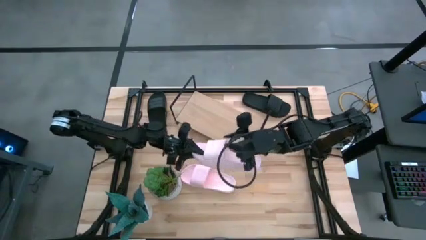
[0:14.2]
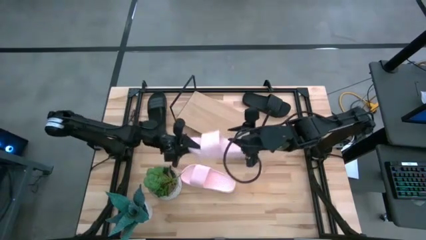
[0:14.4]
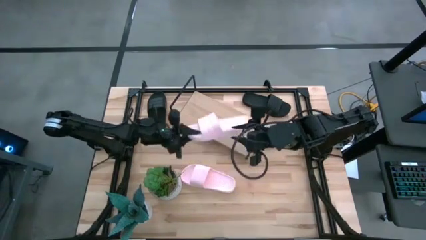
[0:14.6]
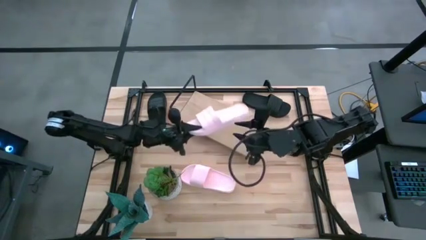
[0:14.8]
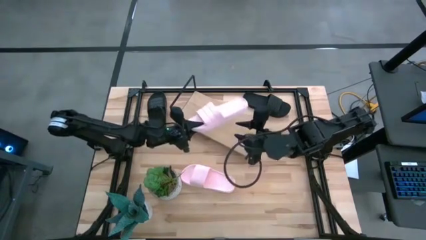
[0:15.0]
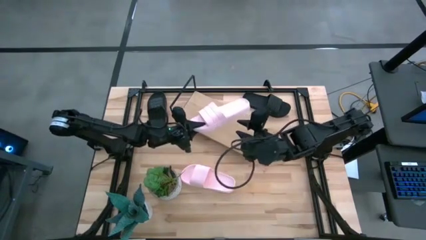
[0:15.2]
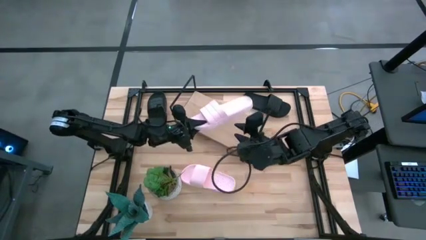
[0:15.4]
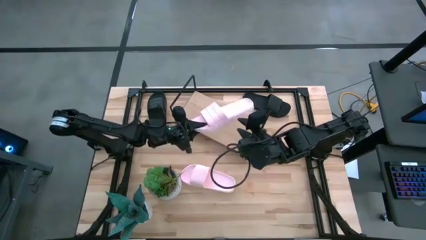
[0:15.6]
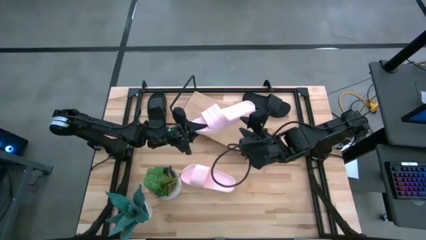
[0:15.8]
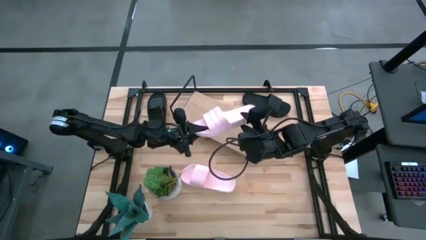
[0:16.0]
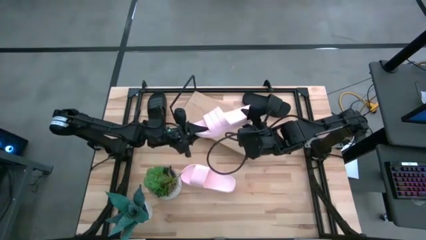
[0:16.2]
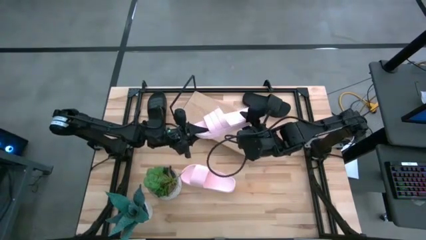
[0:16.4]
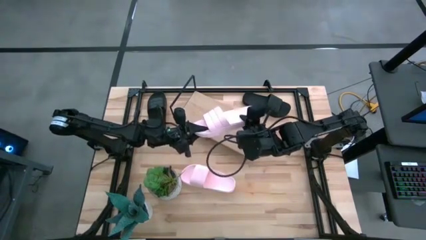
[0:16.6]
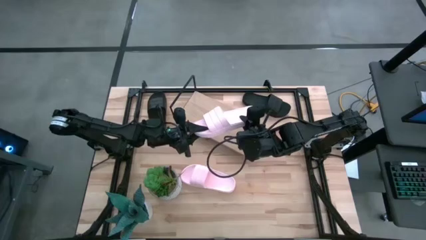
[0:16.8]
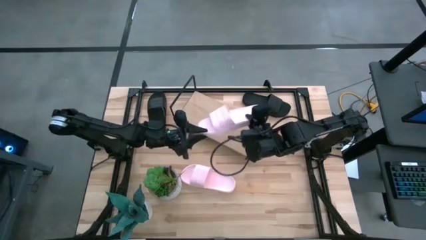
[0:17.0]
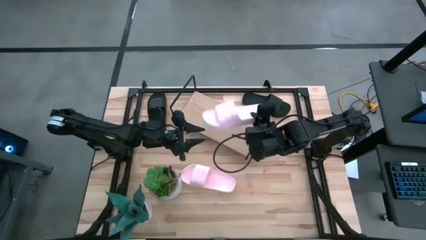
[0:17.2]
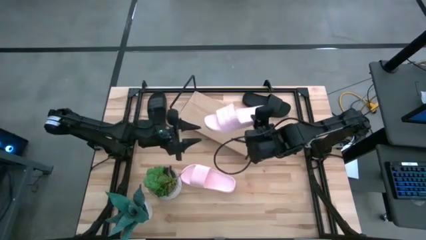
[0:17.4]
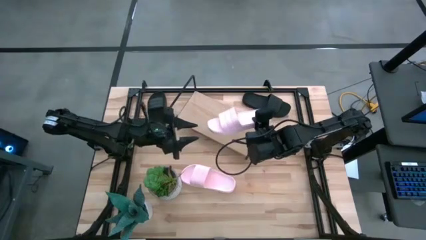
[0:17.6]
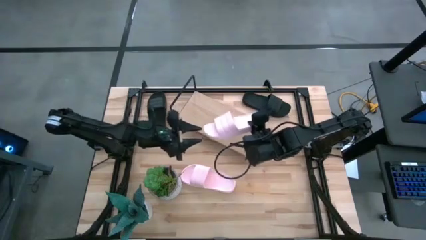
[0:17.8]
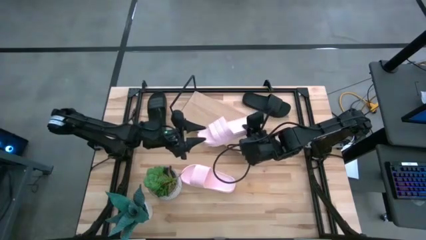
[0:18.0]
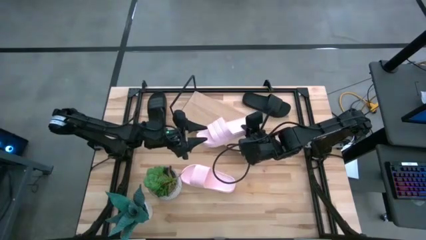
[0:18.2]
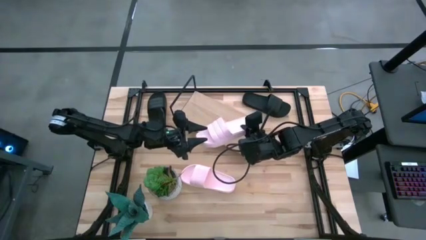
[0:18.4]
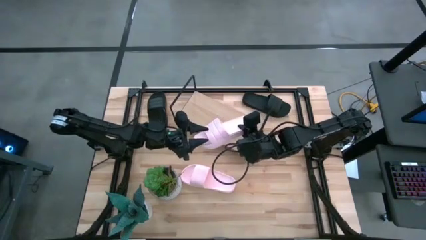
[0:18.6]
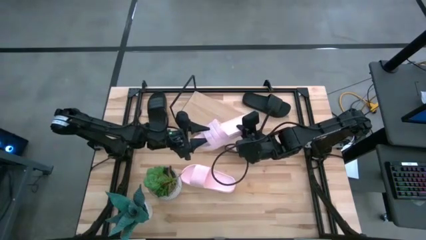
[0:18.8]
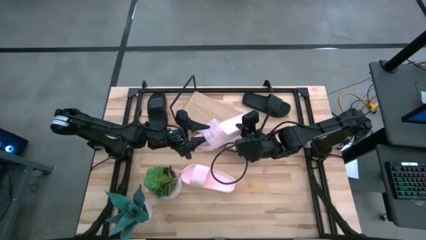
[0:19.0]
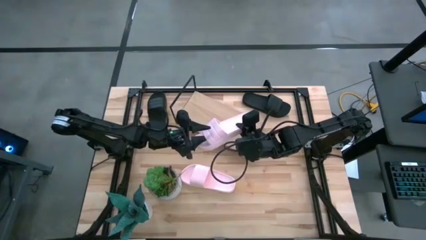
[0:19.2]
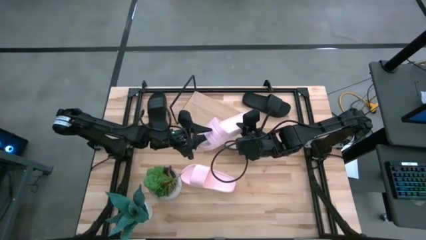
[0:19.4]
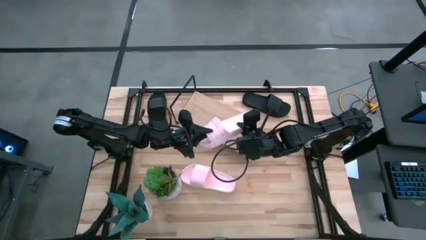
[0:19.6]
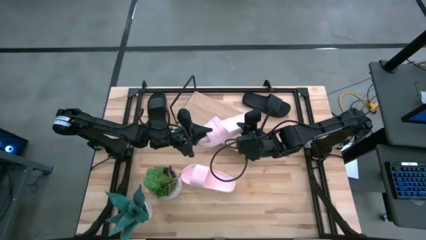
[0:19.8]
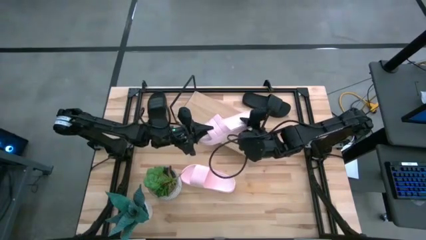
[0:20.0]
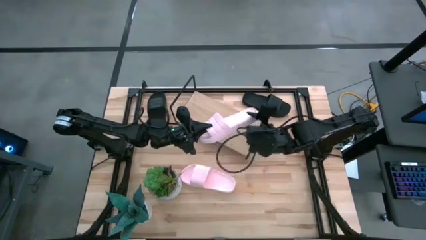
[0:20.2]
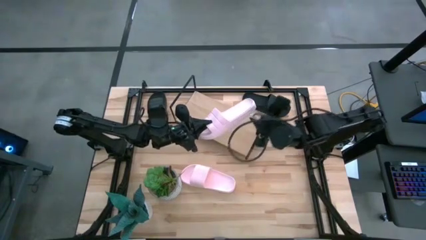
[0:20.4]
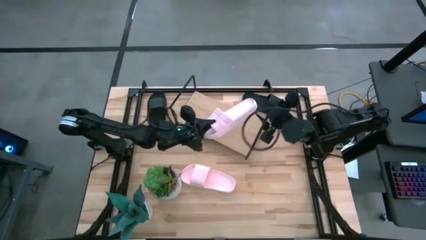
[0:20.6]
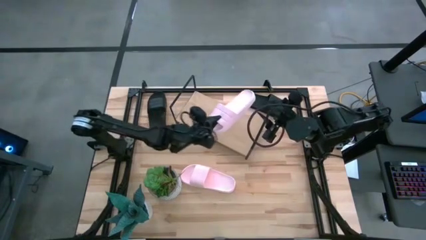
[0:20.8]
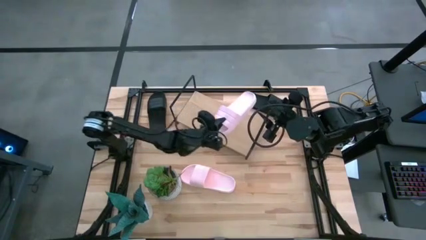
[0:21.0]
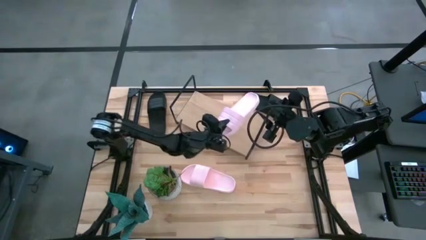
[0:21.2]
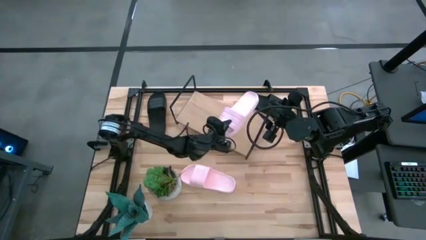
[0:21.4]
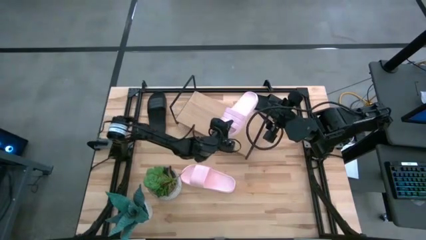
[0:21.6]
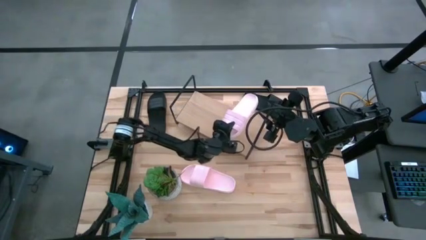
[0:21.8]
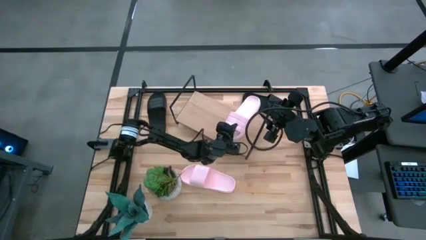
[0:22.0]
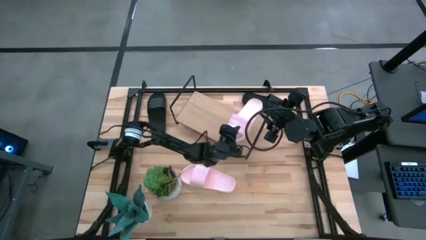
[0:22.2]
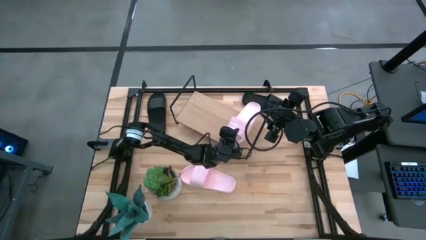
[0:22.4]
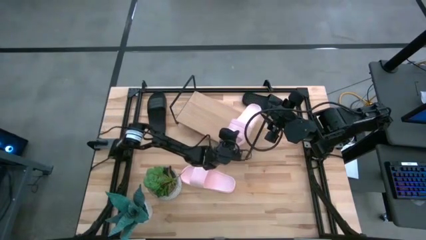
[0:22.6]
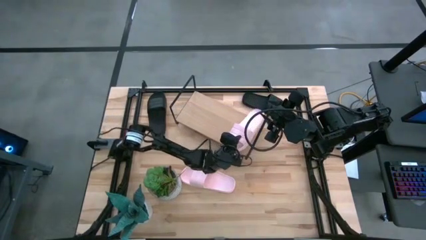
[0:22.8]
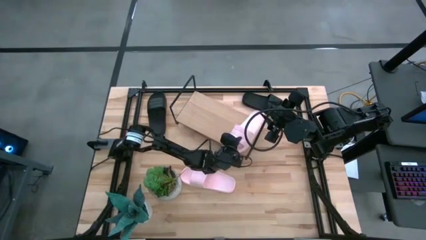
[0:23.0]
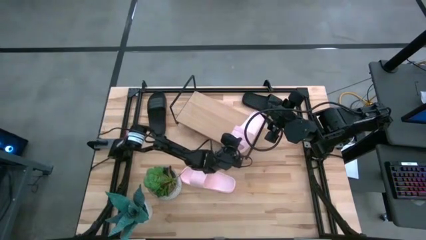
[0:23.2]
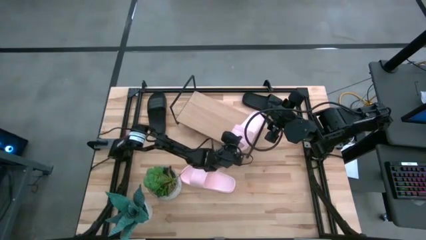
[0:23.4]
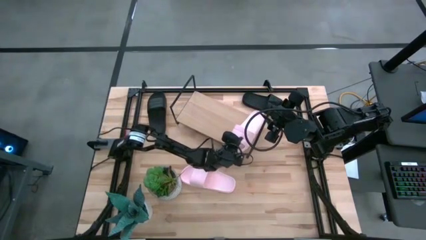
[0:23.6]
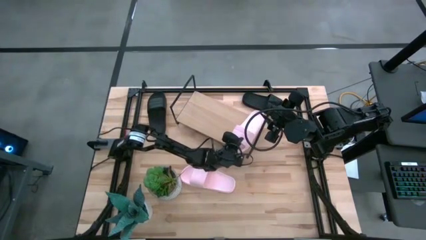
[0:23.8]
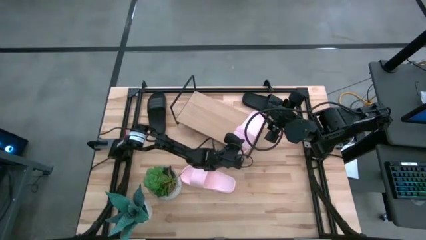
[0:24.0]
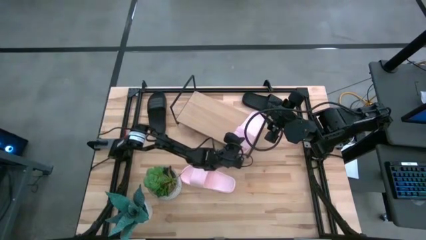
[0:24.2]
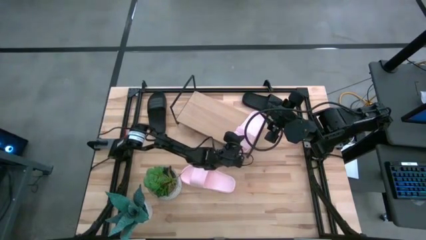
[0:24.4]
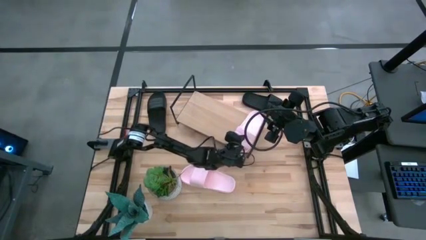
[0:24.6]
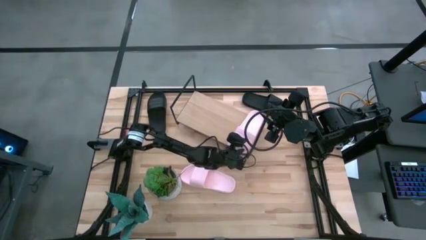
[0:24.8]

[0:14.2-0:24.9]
Task: Pick and place slides into the shelf
Put the right pink slide on the shelf

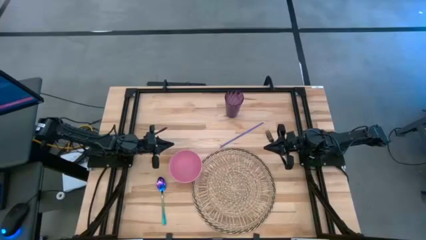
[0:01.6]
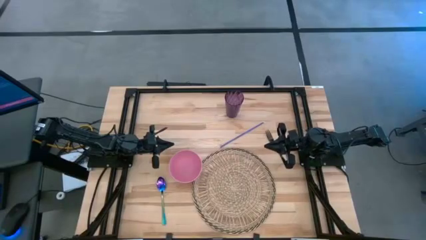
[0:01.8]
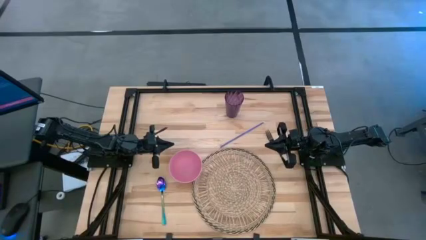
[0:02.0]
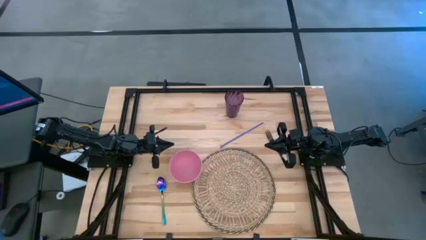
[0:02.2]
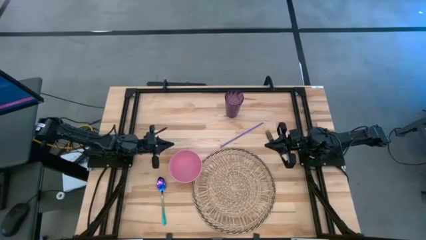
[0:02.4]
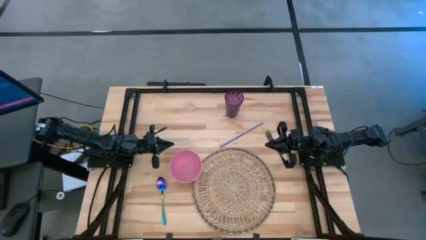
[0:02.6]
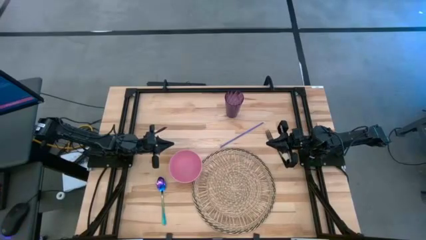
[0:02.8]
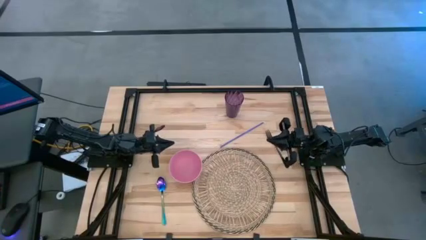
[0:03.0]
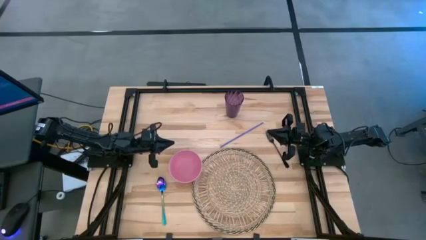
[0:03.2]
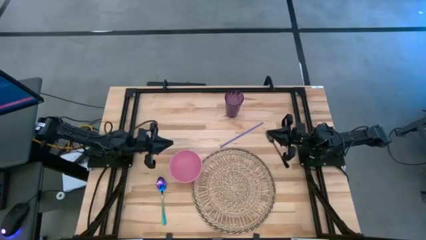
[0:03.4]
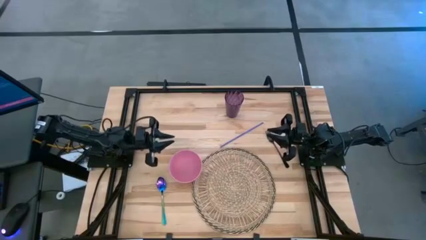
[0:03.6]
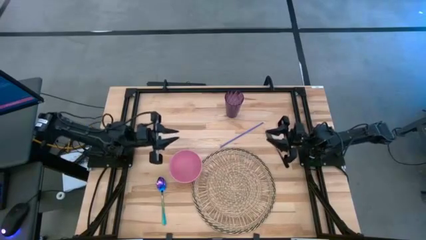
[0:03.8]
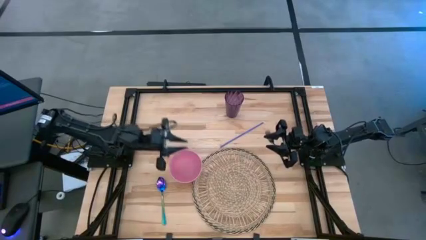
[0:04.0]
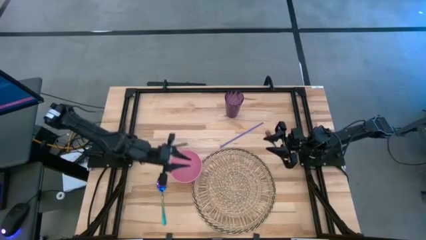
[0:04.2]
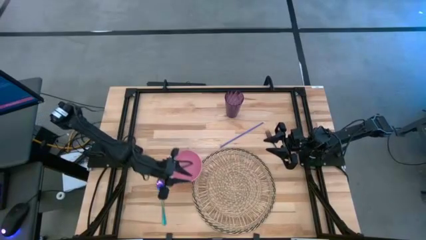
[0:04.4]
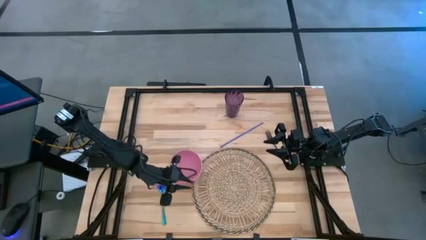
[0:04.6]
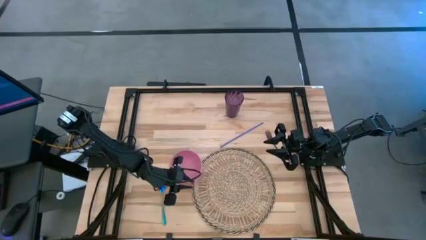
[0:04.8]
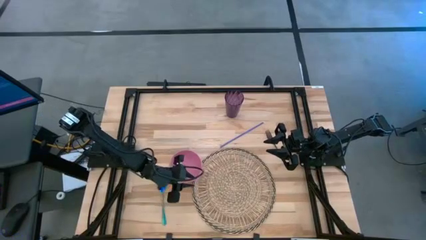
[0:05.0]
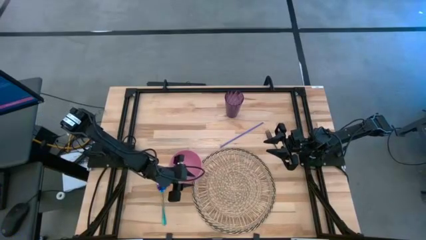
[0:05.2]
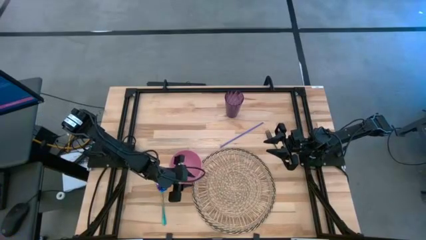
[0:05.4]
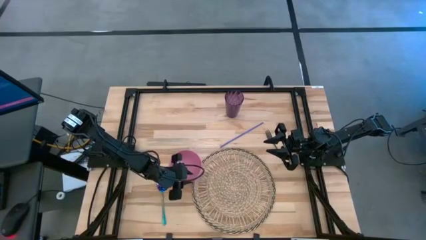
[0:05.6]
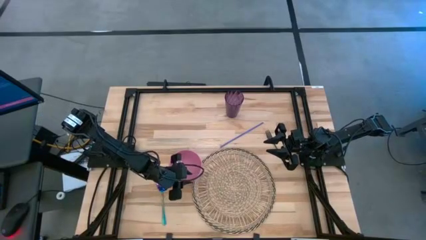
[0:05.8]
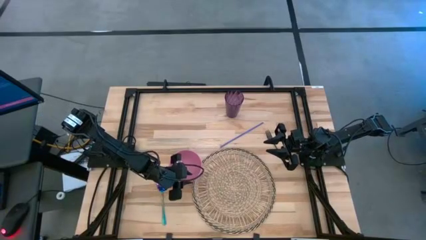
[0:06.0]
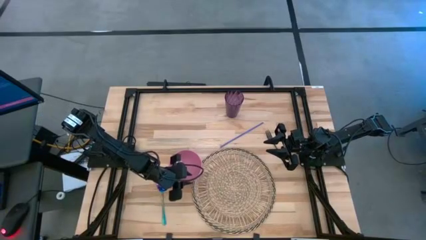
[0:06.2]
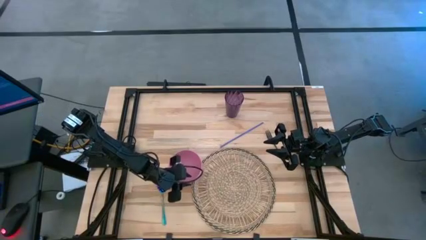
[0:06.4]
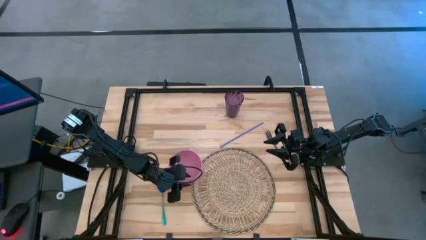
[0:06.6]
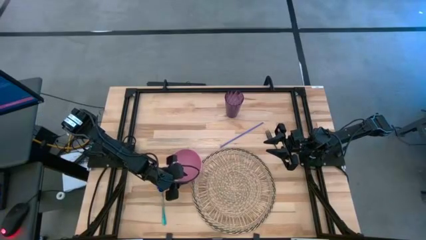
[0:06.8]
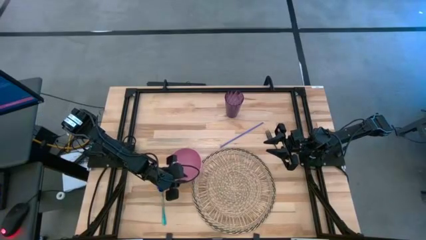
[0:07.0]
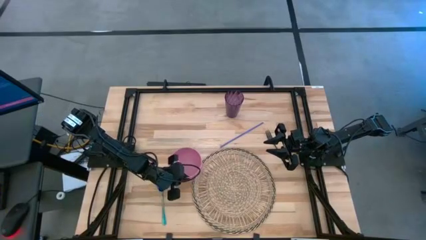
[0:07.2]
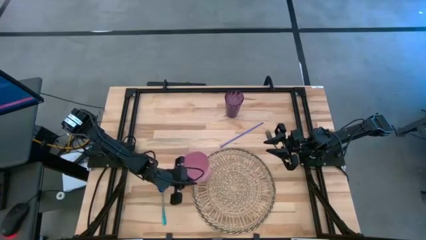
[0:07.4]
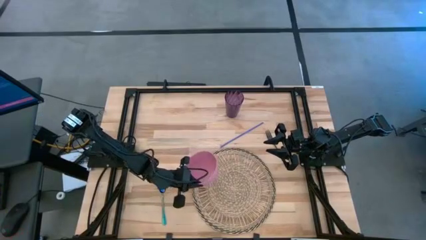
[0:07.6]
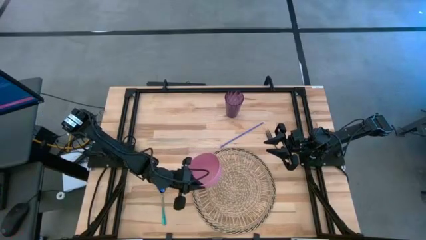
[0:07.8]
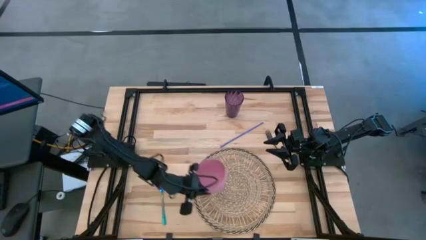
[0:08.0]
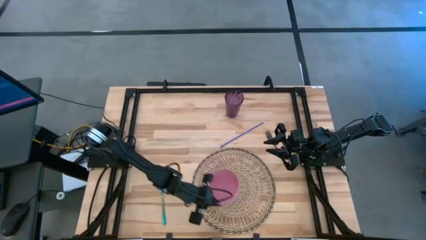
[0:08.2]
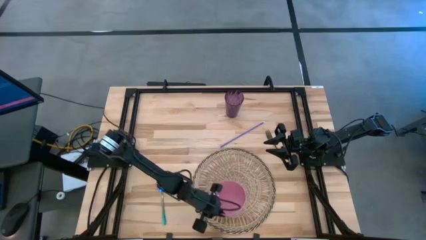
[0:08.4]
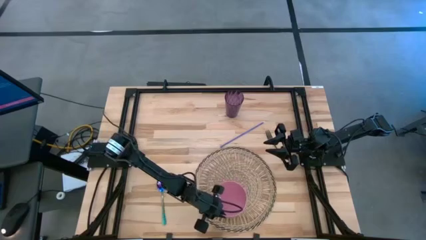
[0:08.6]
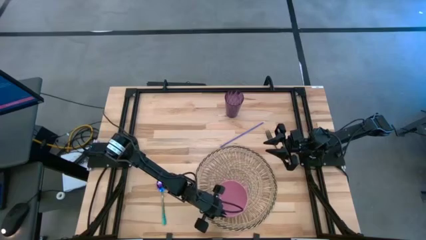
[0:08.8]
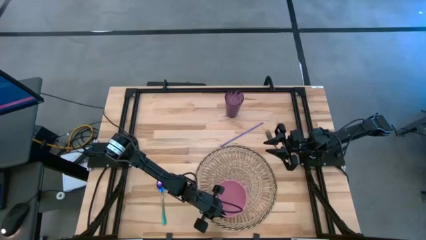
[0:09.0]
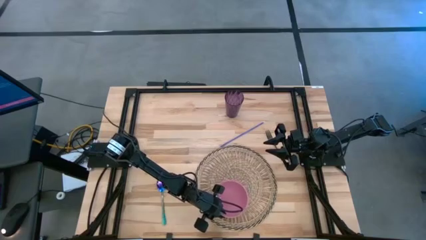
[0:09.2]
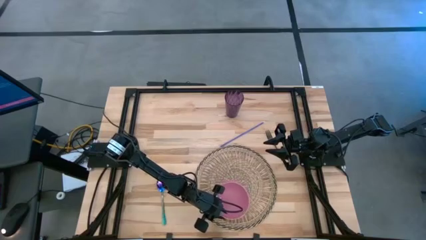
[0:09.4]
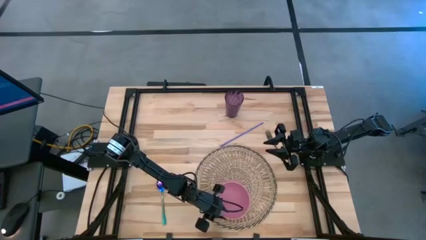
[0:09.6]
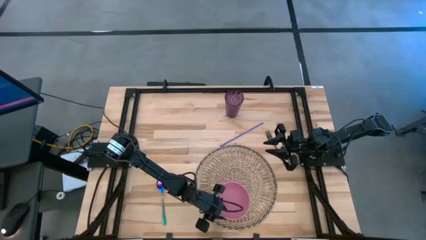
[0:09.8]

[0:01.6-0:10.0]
Task: Pick & Place Utensil
Put the pink bowl on the woven mat
